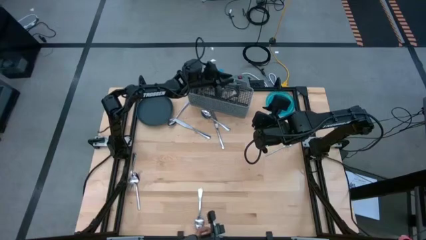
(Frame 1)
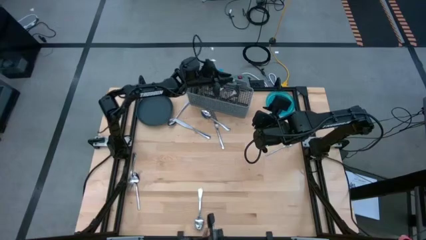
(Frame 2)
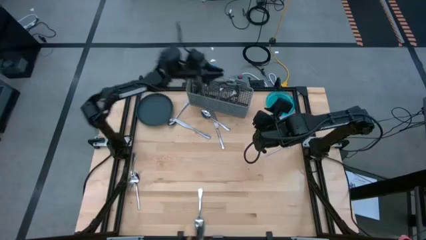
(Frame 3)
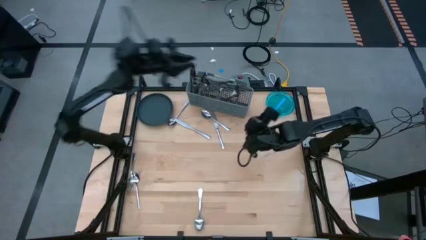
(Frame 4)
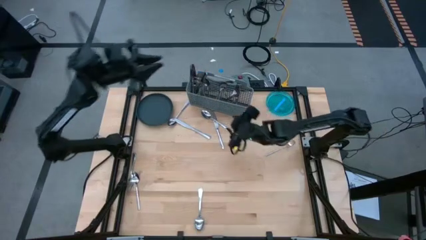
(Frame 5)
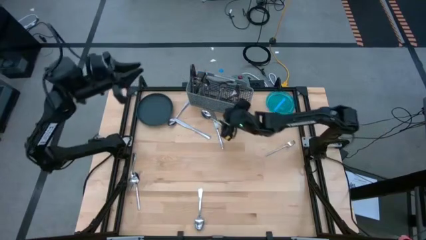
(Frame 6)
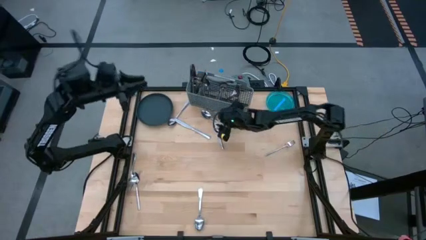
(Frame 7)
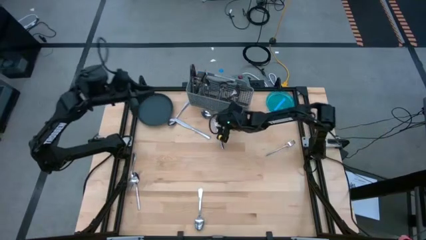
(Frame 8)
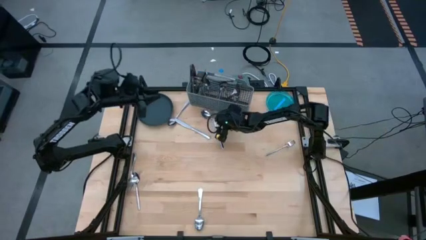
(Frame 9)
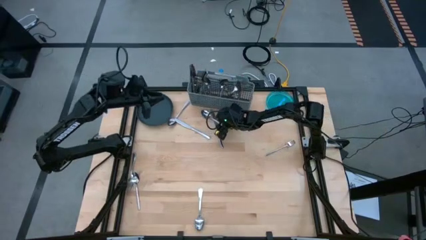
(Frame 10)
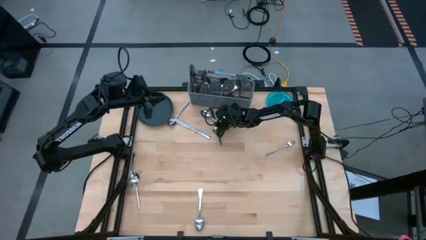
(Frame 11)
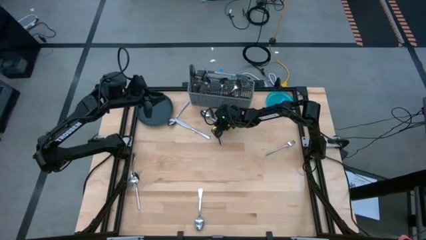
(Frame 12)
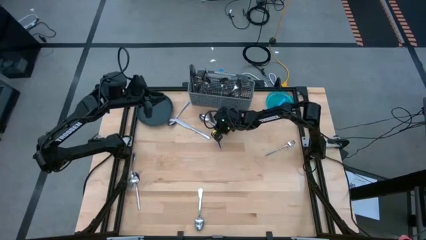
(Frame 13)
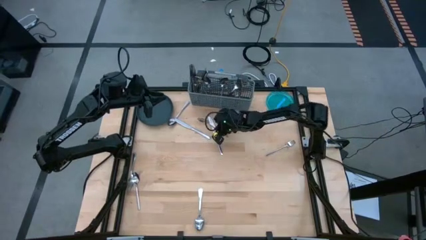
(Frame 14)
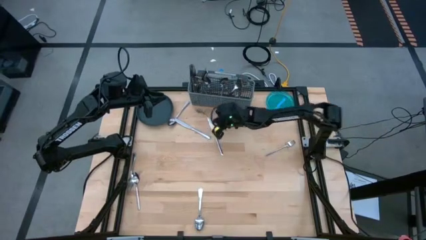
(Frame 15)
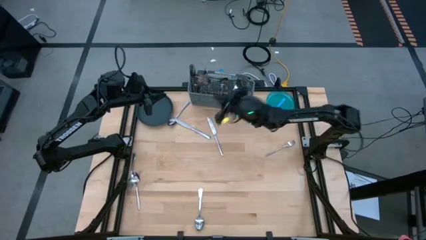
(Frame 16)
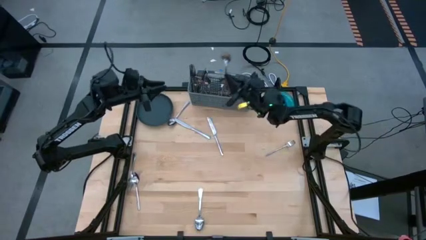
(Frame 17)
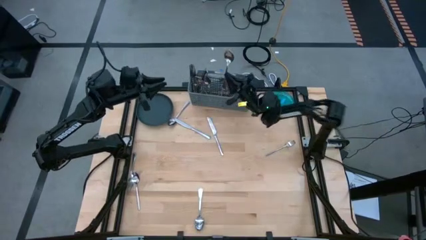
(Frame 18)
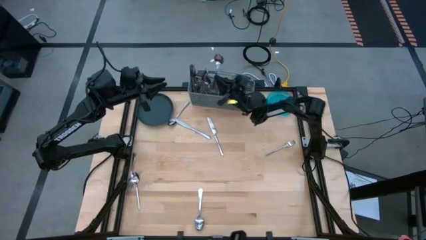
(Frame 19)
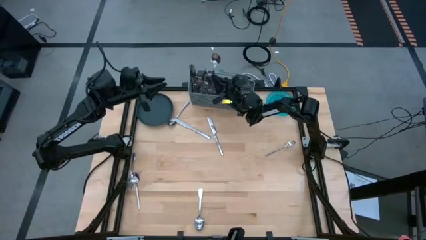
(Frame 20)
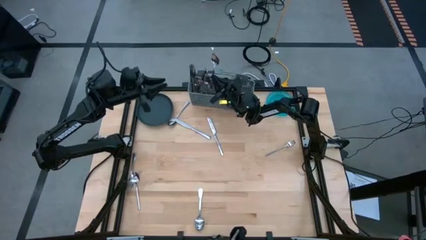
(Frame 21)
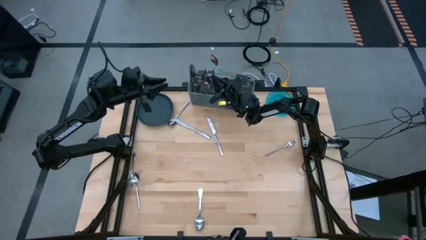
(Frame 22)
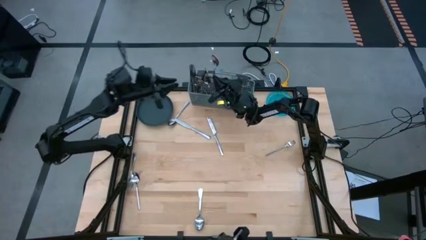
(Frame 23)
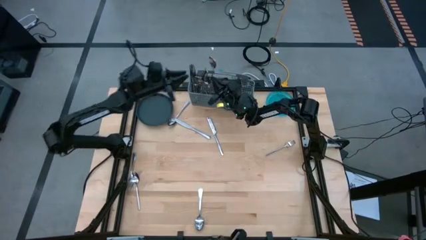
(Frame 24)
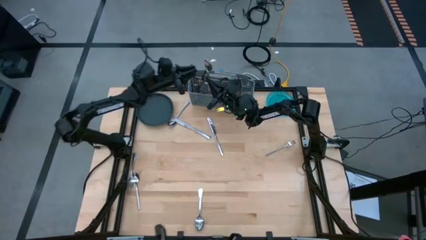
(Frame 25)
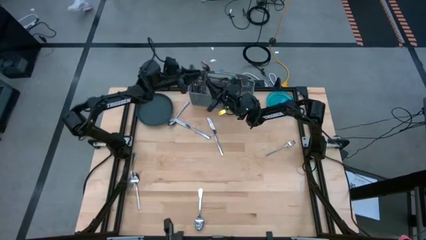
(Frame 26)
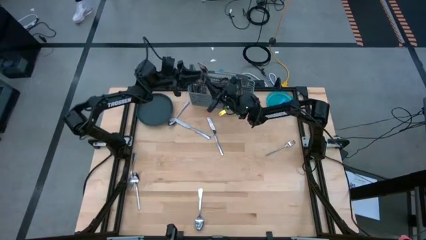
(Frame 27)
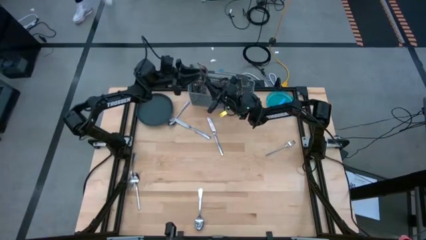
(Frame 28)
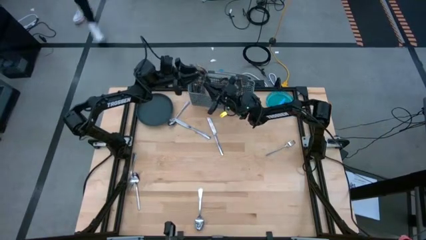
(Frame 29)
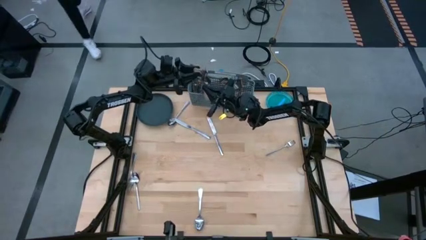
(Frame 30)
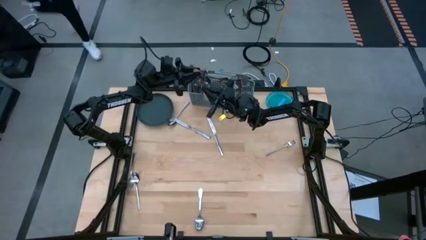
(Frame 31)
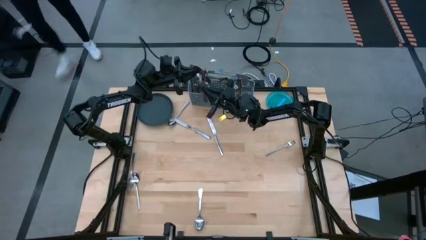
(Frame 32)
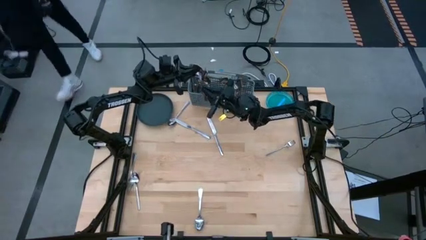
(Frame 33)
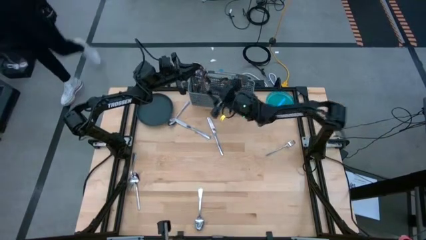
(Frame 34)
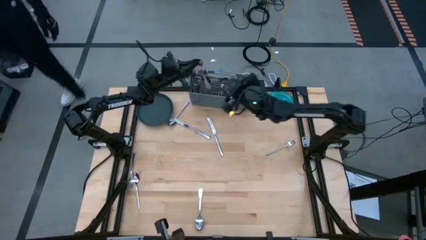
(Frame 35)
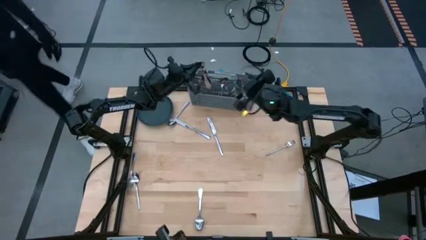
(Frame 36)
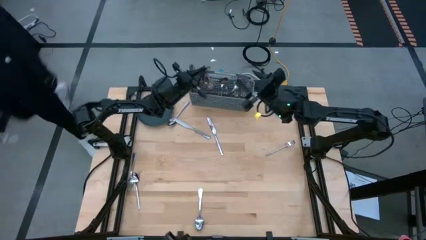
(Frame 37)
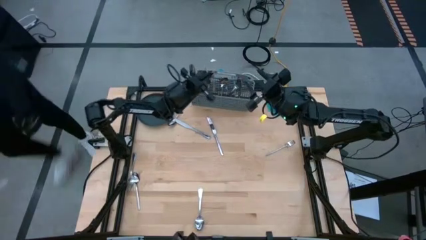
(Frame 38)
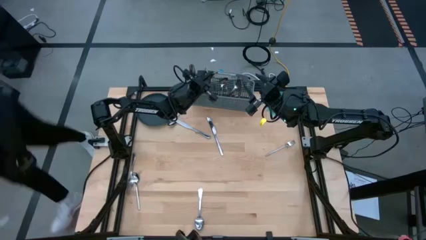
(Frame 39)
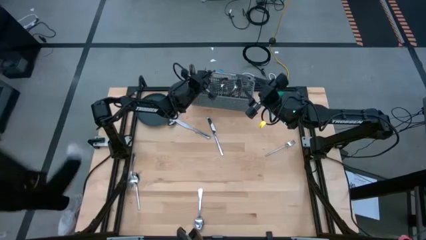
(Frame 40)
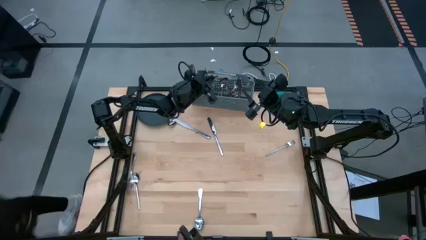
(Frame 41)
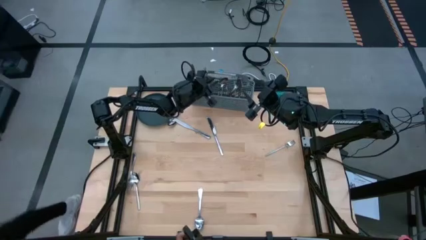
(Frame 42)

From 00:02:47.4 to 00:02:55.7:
Task: Sort silverware
Put the spoon into the silverware basket
